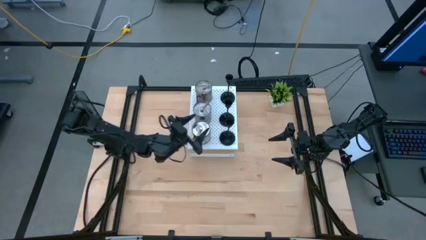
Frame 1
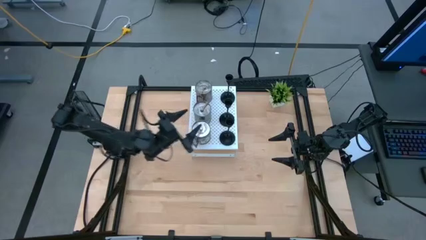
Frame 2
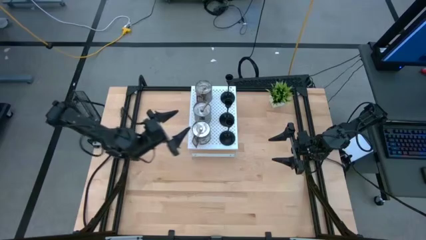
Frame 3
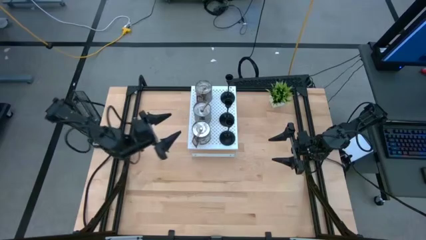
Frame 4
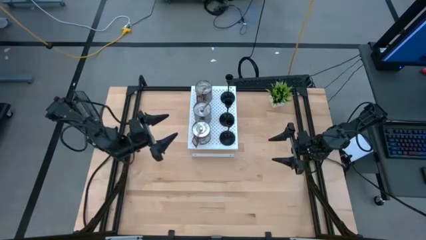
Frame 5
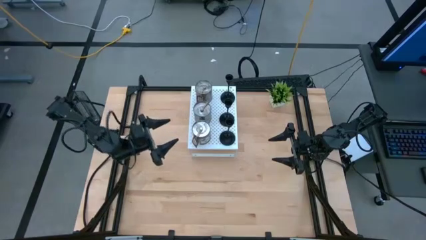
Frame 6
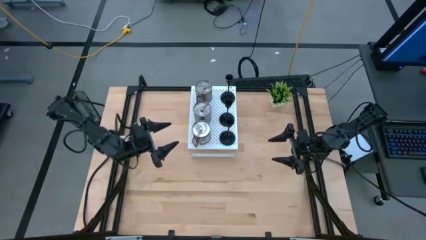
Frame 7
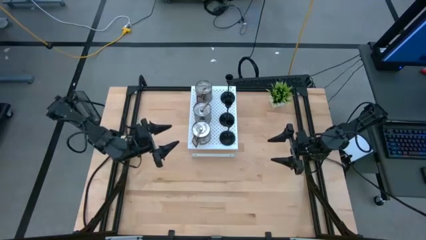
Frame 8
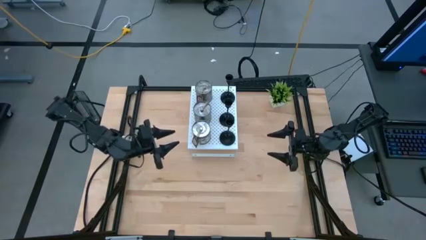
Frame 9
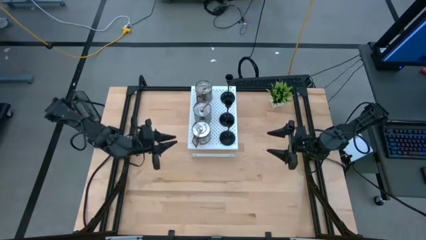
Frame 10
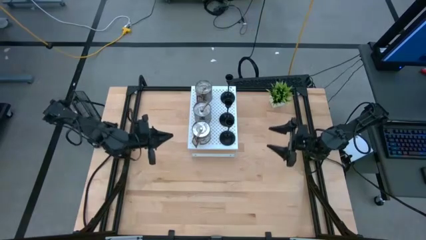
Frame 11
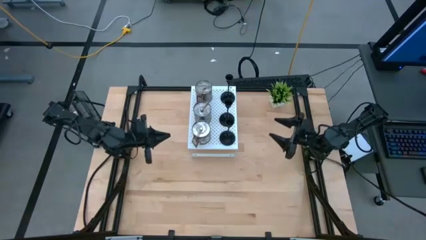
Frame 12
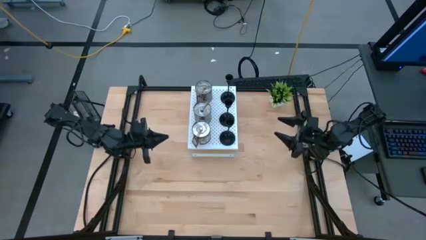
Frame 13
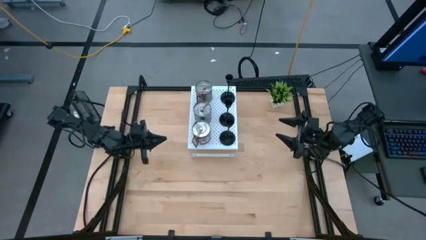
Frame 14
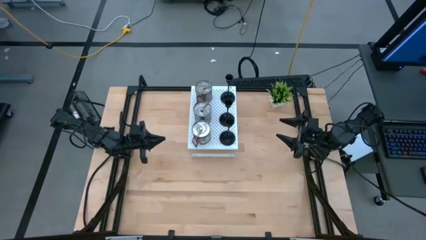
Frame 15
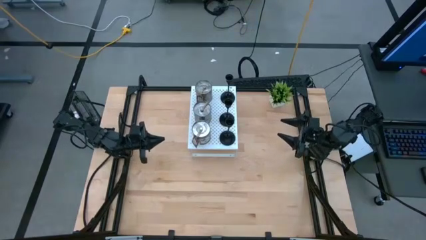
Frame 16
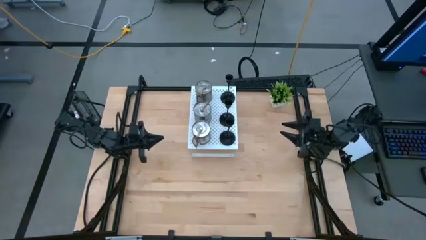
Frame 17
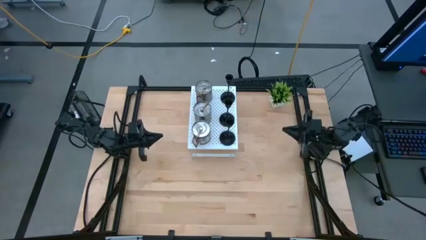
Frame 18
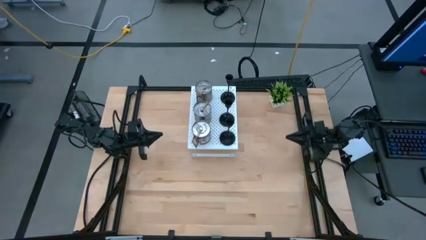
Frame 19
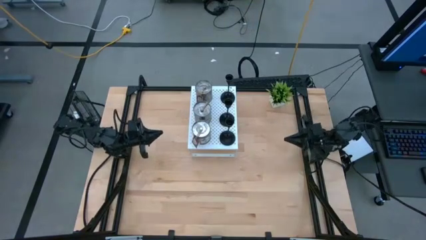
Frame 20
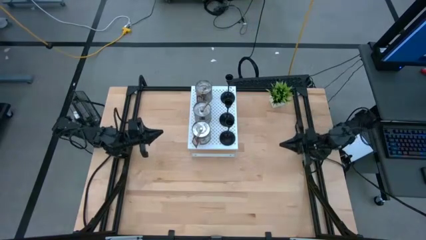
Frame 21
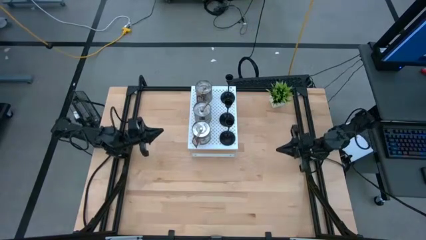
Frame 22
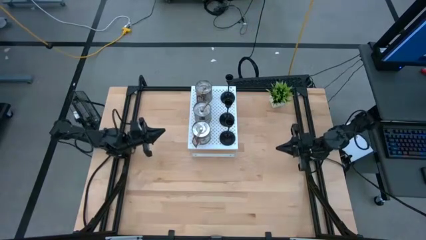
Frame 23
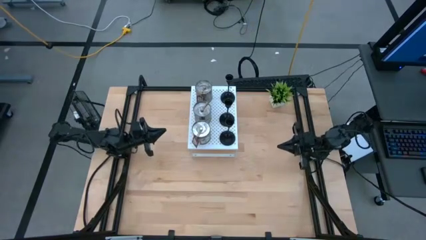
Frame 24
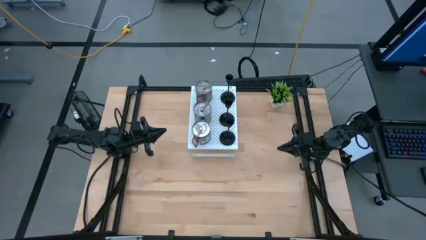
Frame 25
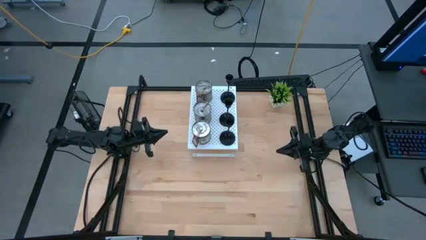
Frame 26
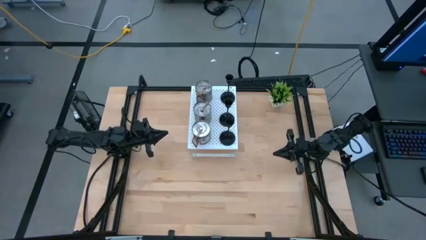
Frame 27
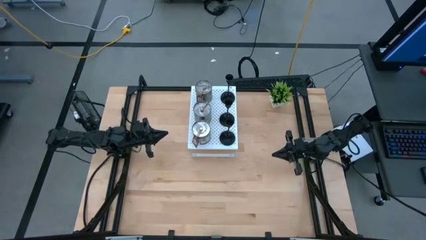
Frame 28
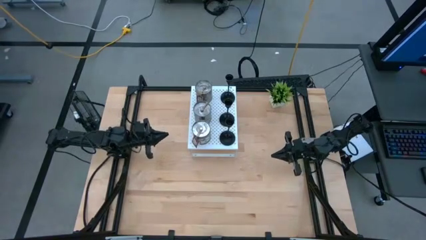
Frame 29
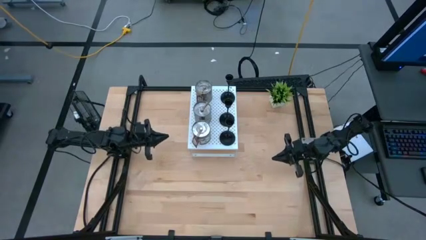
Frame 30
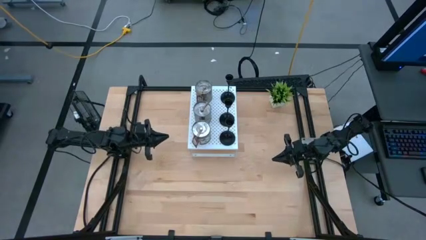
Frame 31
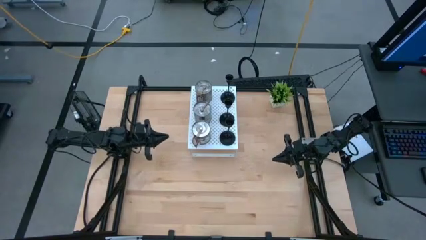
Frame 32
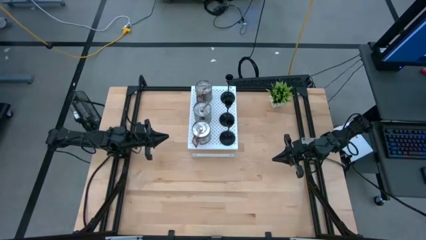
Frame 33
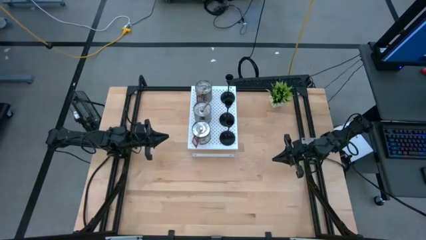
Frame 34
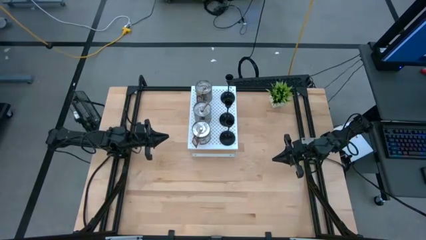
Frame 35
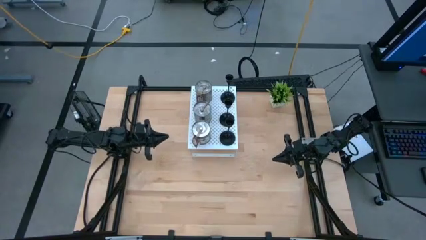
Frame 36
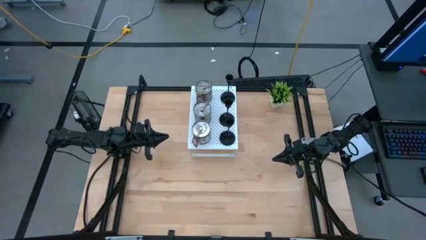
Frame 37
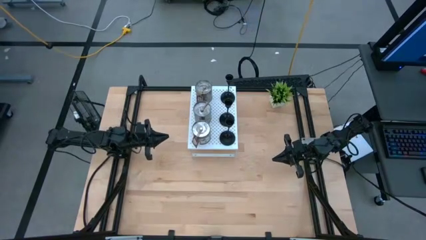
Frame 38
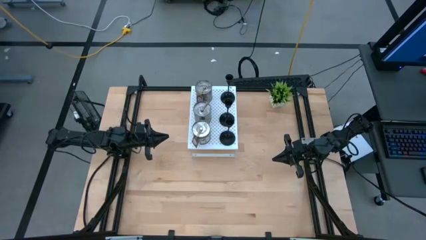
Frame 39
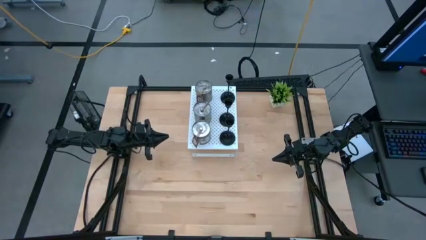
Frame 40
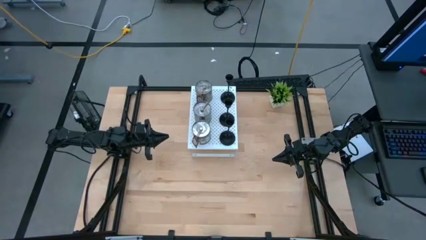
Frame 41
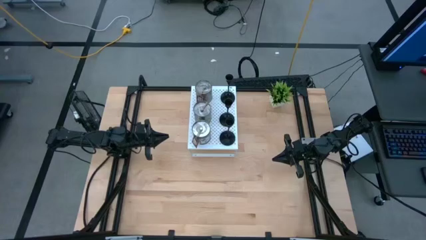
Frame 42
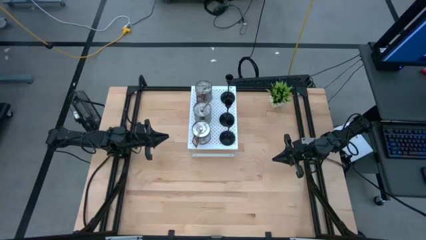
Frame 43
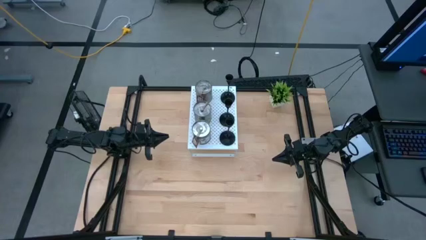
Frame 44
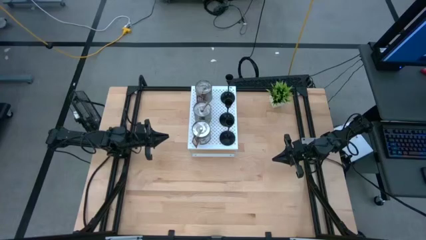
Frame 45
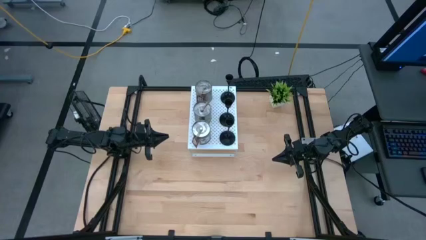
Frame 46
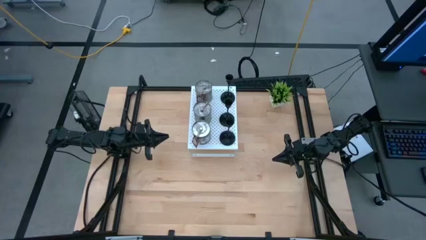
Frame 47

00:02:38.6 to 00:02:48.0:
Task: Pick & Place candle stick holders
Return to Home Position

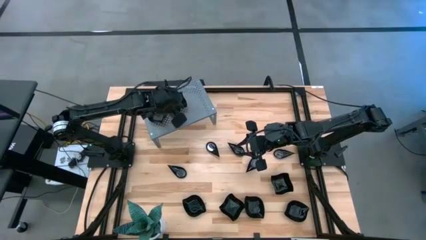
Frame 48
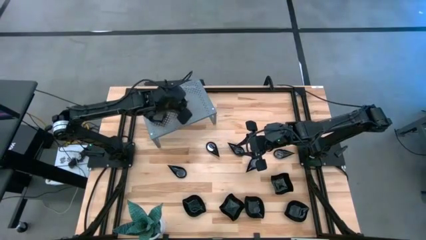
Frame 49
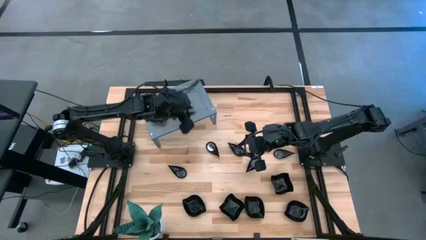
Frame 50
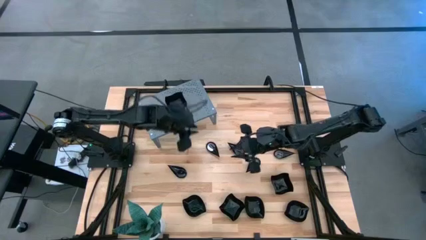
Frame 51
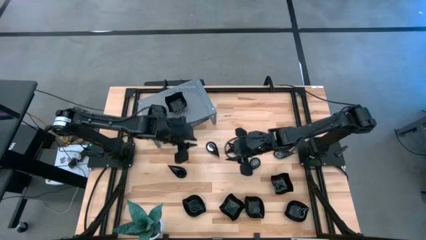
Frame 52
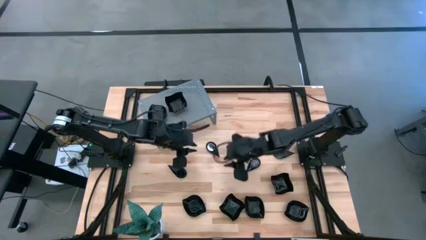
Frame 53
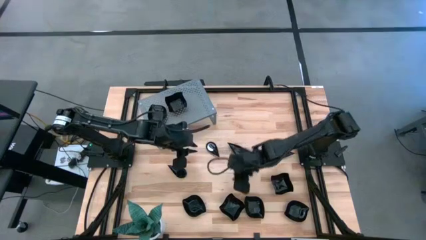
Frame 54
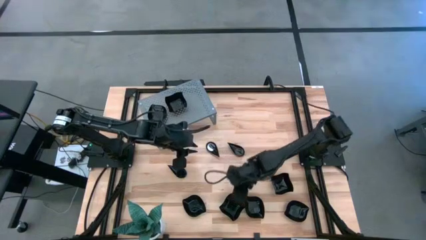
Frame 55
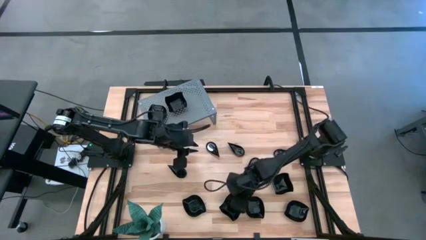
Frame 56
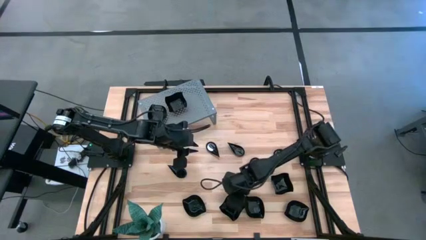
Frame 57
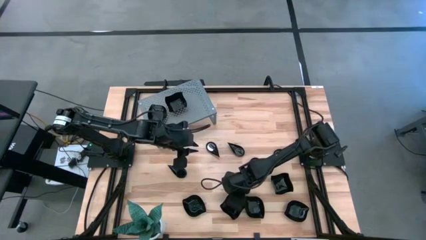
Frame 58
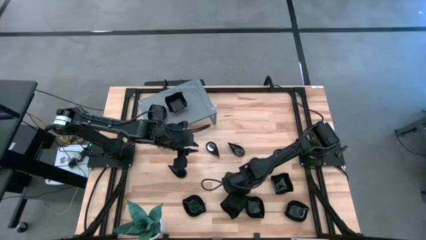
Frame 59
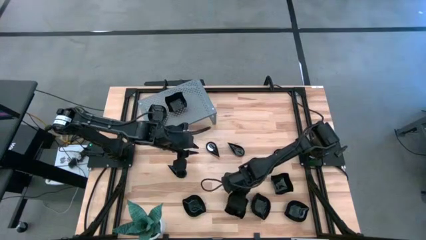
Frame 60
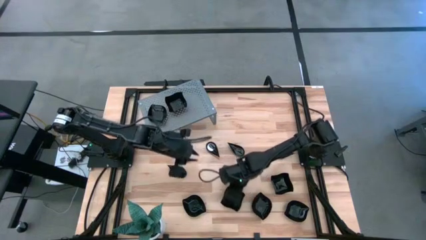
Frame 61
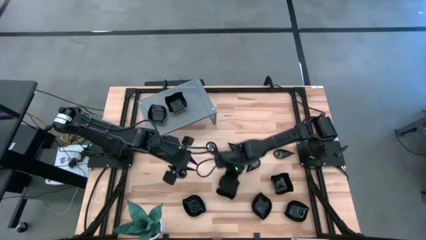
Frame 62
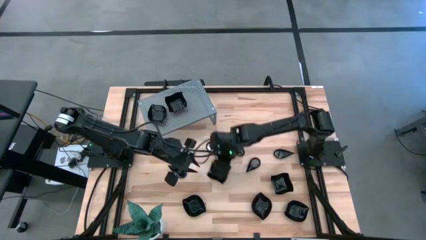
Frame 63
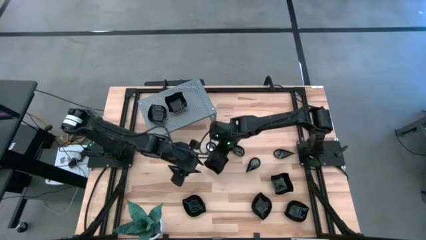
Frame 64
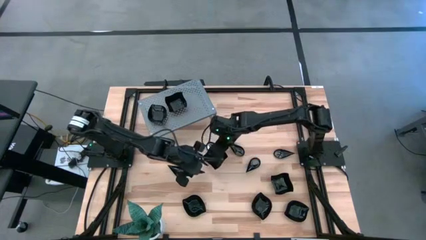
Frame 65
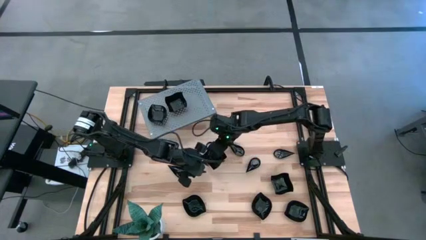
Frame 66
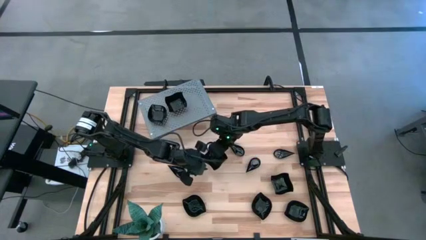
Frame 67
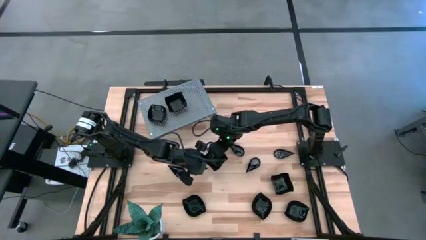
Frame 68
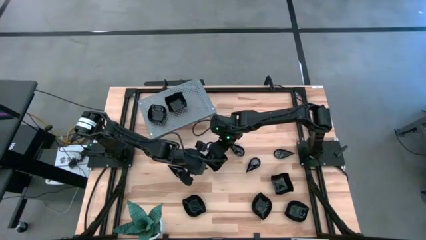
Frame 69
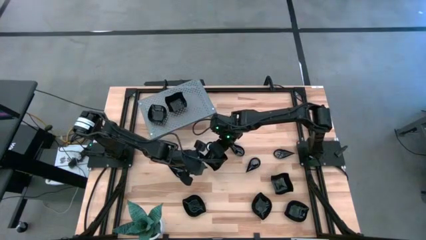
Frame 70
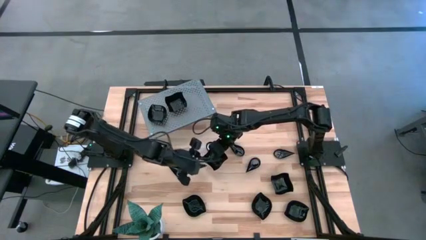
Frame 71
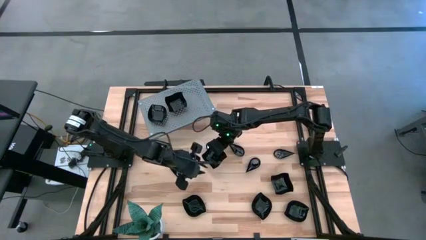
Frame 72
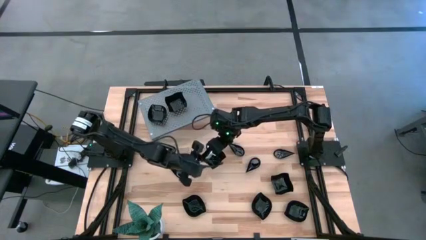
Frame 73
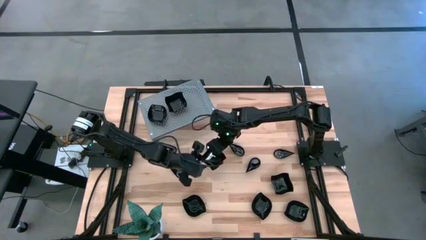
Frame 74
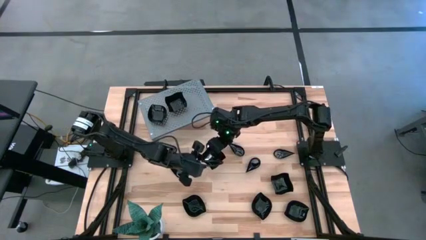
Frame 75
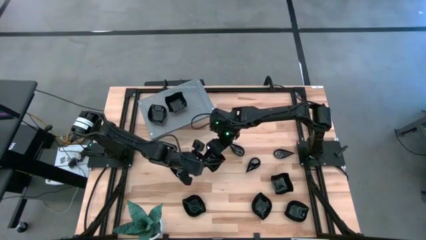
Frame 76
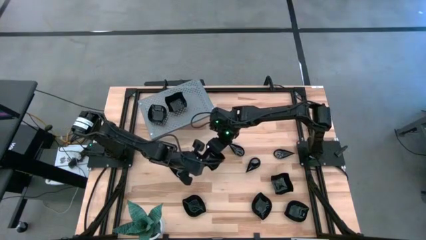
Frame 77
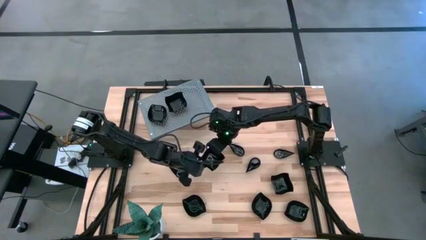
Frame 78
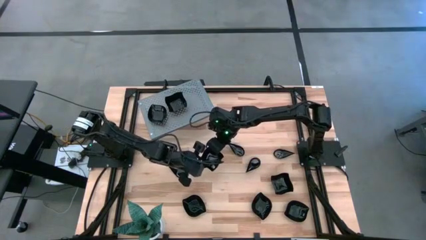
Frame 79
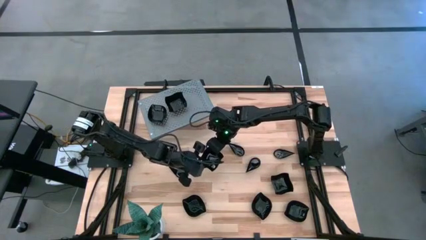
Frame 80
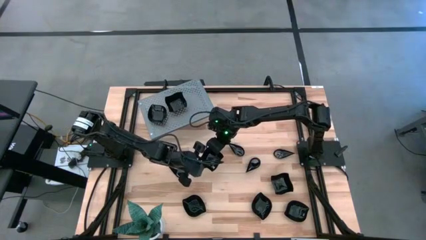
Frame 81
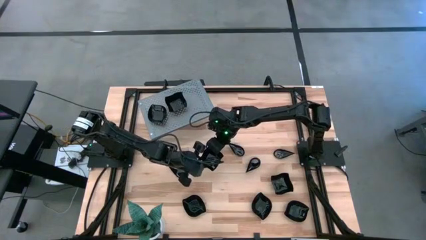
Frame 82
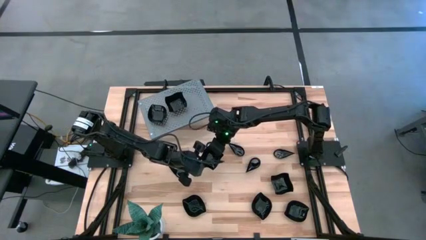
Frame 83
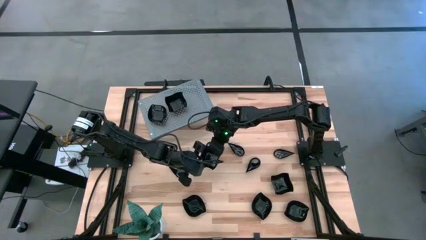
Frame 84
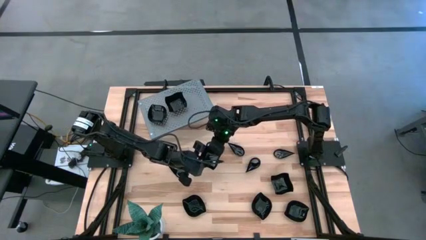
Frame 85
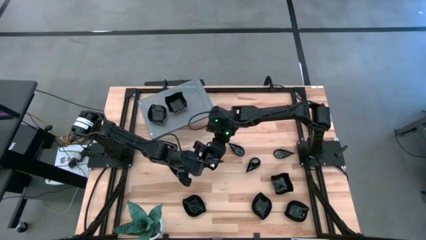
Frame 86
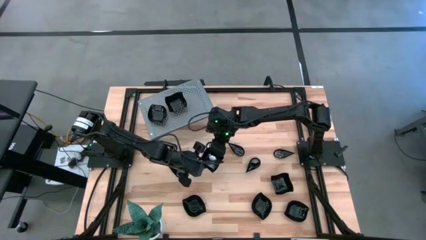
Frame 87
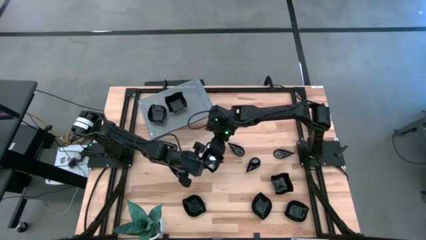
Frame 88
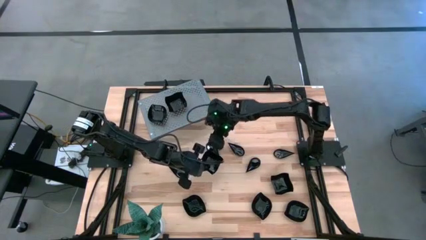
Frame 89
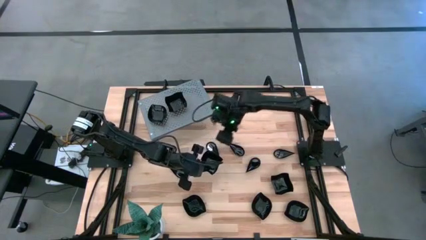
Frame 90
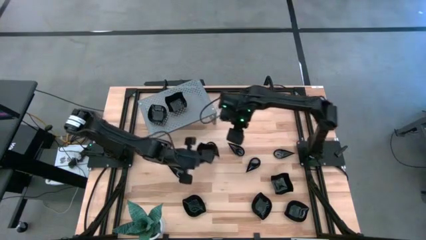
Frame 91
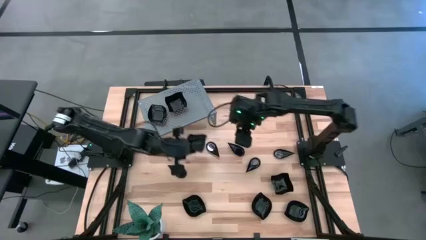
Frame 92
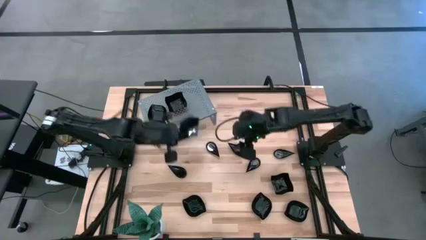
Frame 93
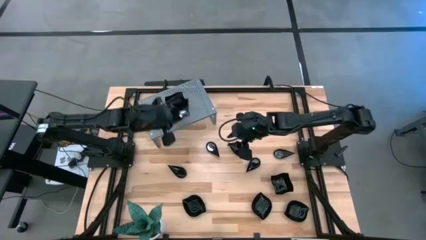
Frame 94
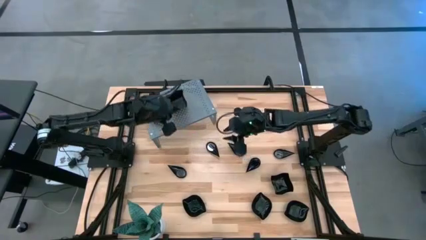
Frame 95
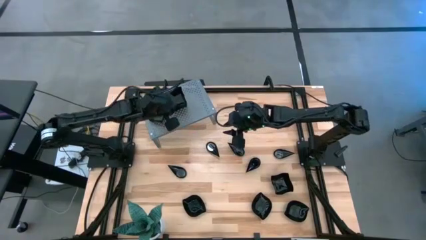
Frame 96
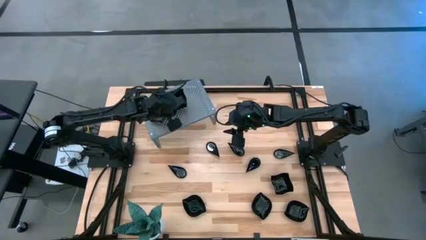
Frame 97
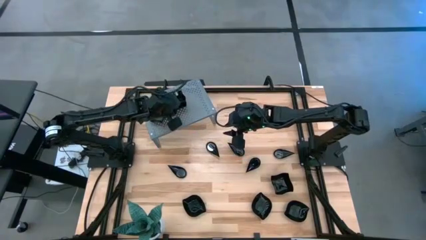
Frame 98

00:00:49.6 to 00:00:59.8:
Task: Pick & Place Mini shaped plates
Stack the black distorted square plate on top of the black distorted square plate on the shelf
